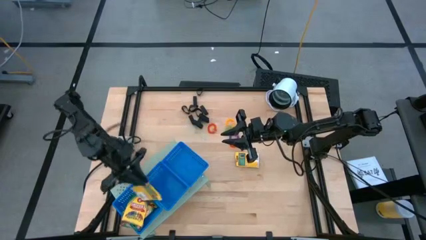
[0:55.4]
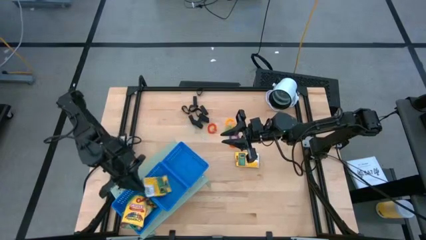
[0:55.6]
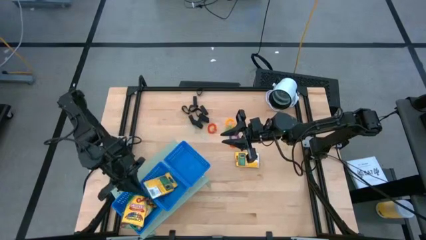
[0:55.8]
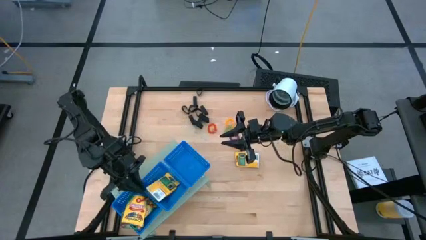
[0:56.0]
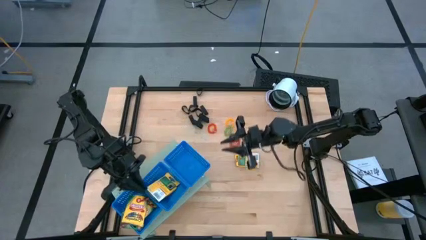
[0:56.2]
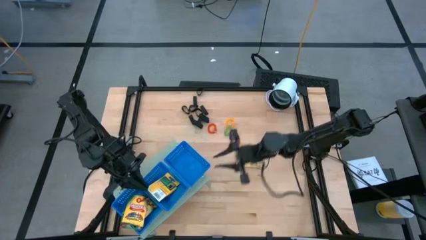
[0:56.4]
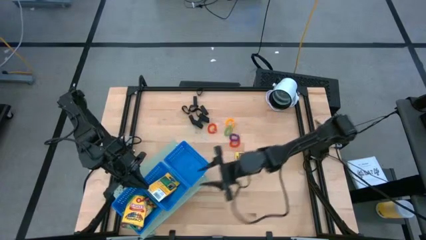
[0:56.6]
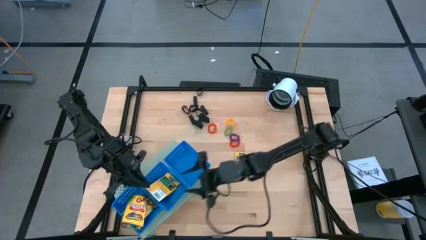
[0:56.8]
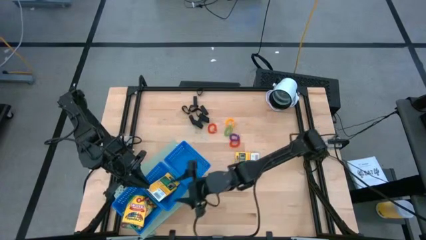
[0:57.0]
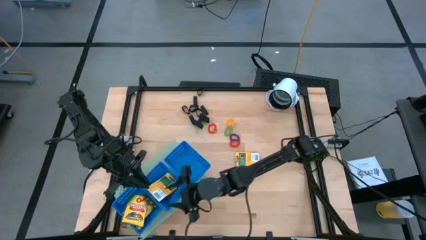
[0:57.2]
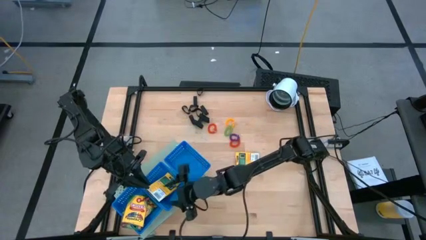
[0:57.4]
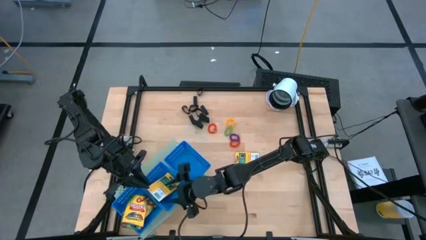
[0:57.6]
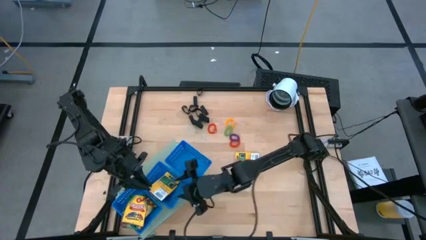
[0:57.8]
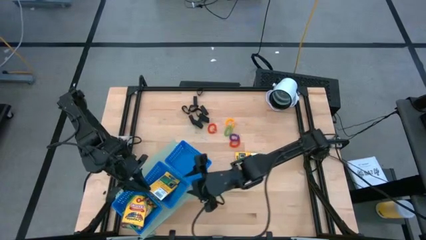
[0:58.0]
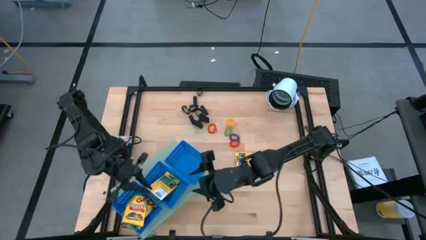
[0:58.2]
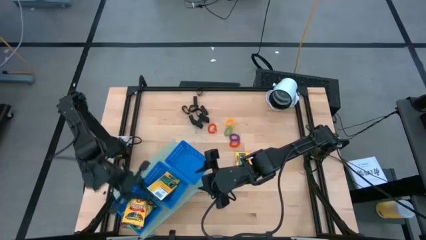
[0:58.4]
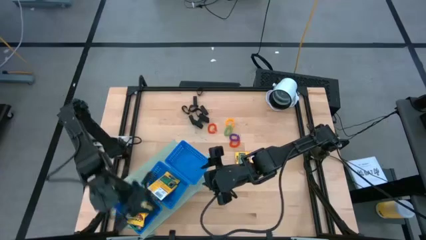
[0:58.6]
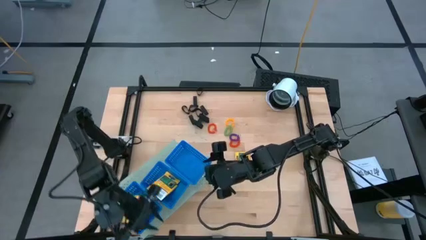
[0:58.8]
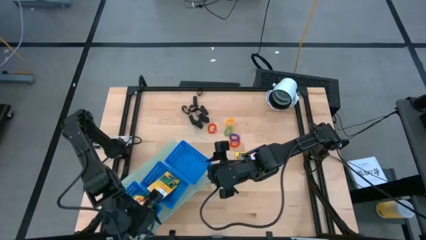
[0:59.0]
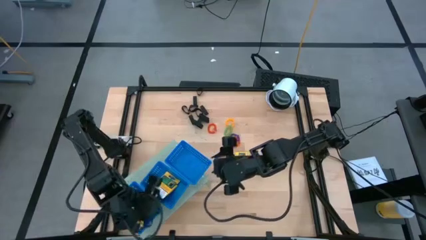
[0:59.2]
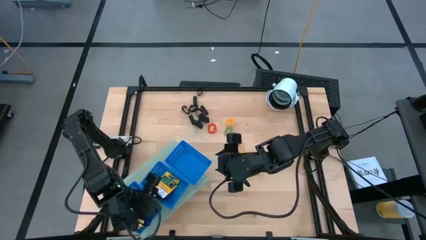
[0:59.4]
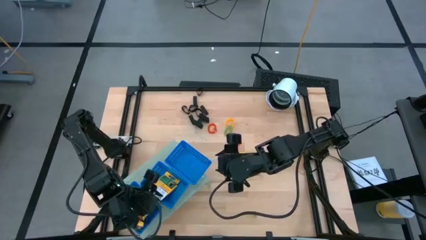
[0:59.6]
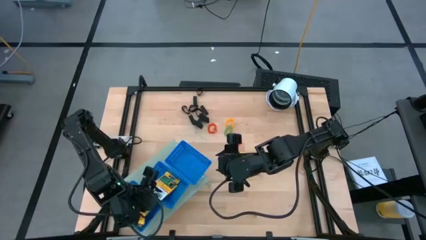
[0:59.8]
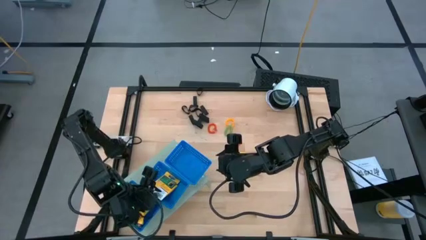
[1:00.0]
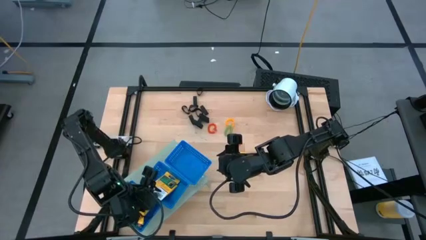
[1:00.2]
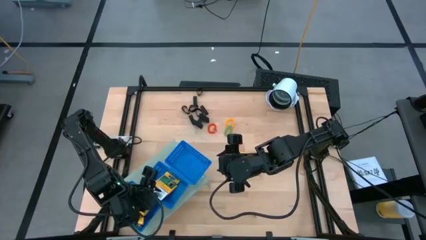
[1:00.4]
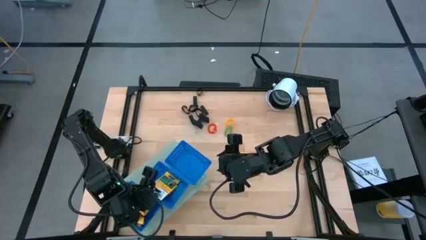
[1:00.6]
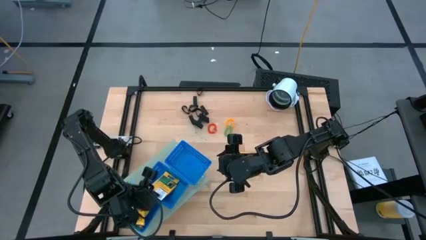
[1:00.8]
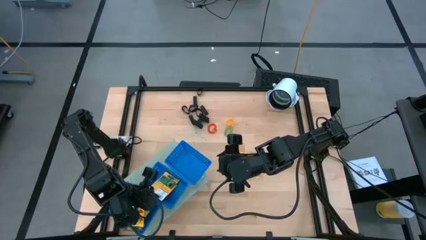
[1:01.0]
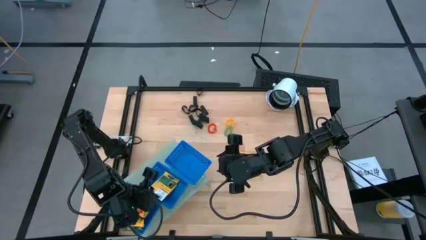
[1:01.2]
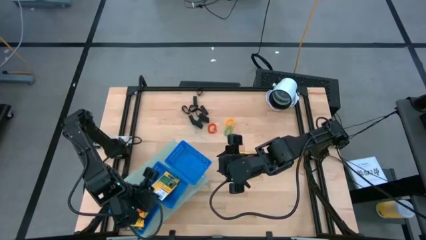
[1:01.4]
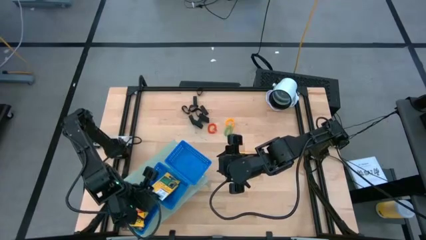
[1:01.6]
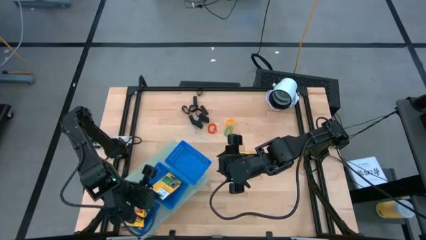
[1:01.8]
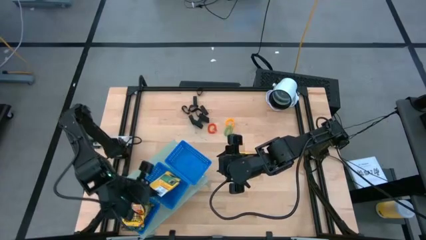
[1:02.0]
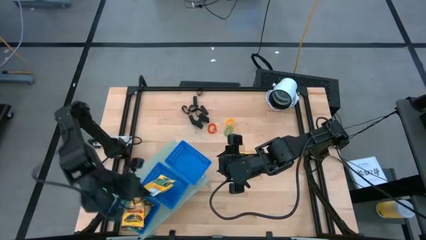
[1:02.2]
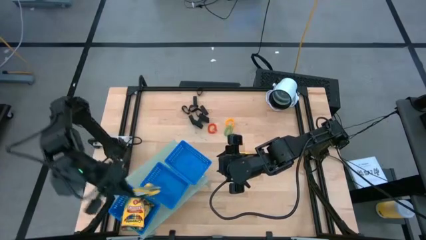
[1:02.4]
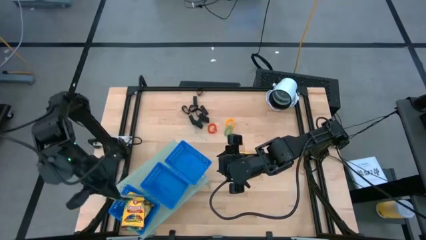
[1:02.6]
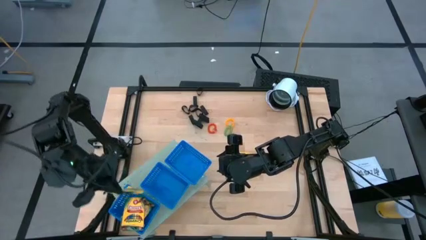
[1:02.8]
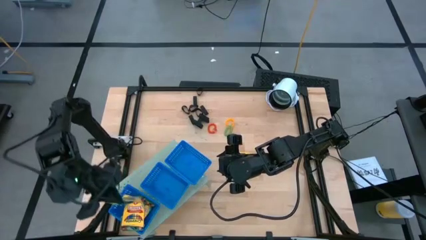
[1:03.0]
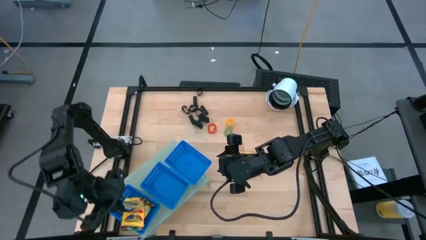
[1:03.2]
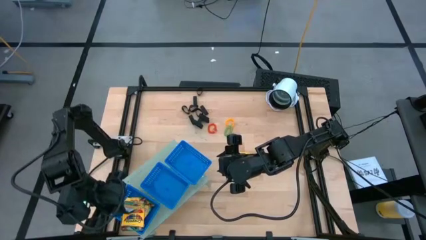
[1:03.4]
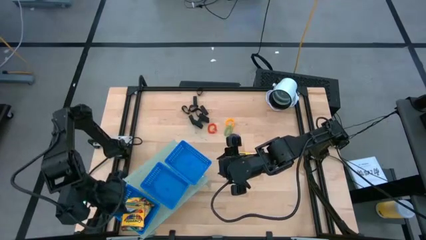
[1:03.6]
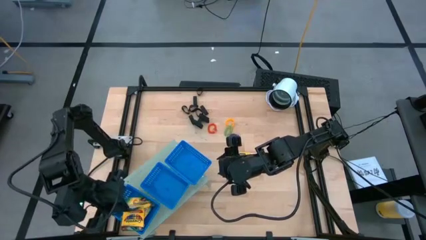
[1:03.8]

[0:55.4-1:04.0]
Task: Pick & Place Office Desk Supplies
Put the yellow crayon box into the bottom blue basket on the shelf

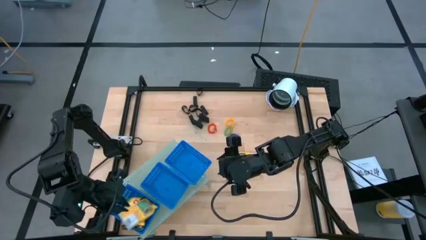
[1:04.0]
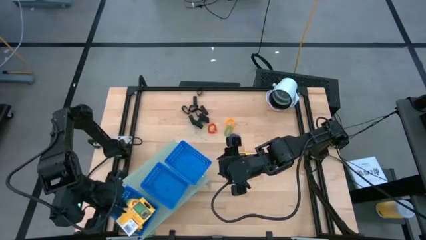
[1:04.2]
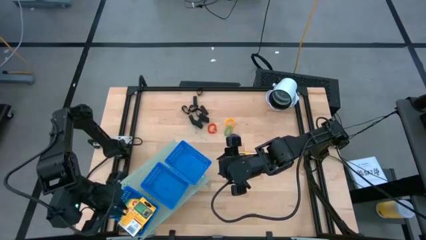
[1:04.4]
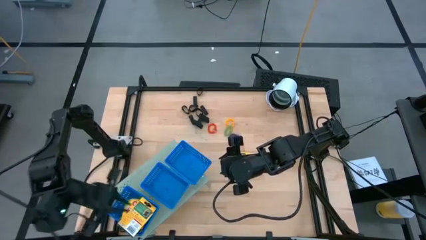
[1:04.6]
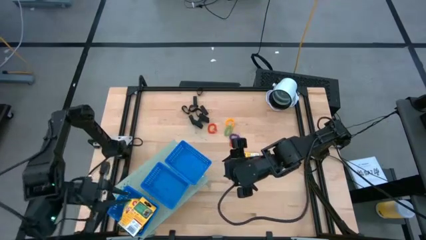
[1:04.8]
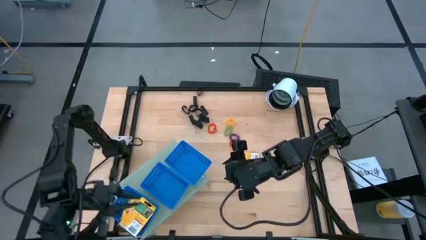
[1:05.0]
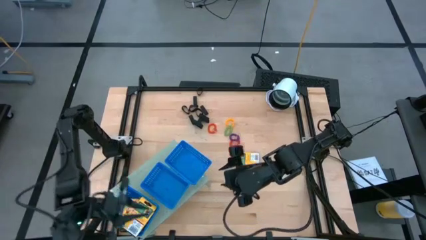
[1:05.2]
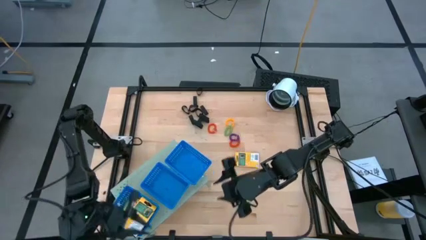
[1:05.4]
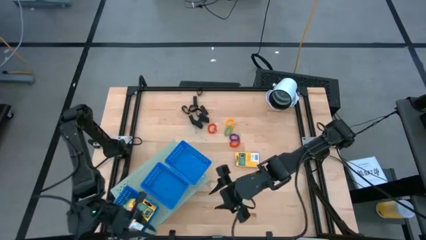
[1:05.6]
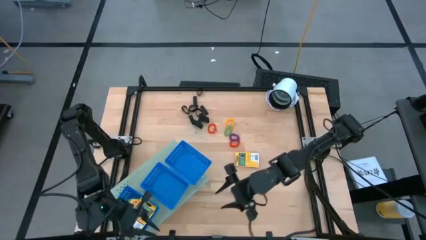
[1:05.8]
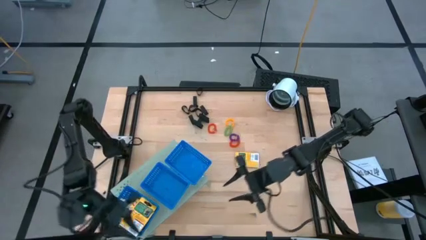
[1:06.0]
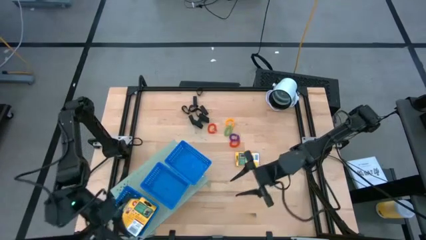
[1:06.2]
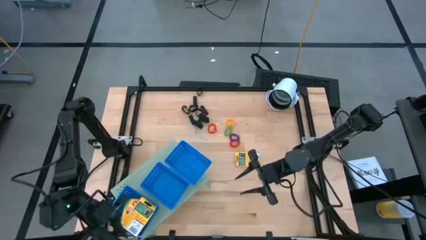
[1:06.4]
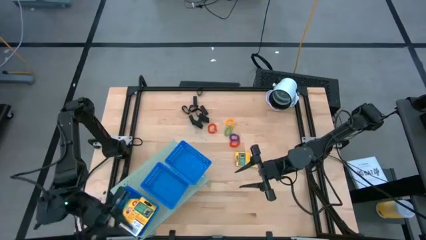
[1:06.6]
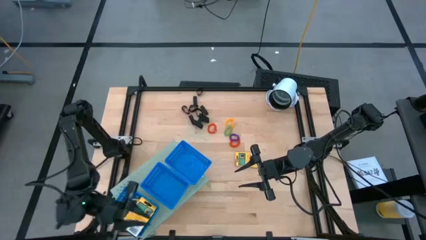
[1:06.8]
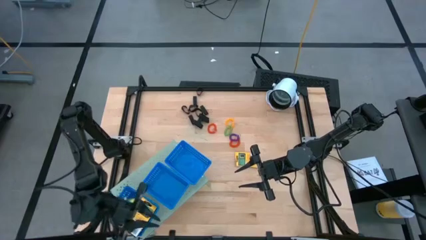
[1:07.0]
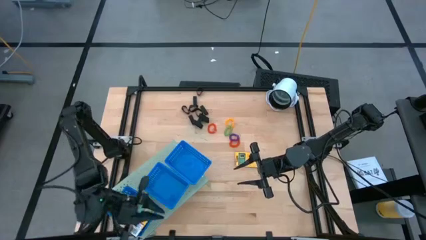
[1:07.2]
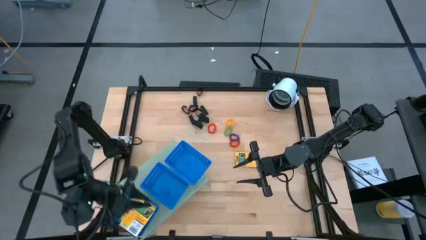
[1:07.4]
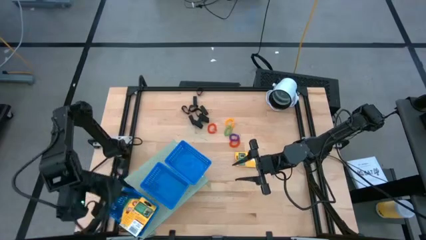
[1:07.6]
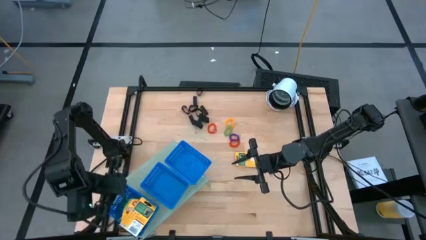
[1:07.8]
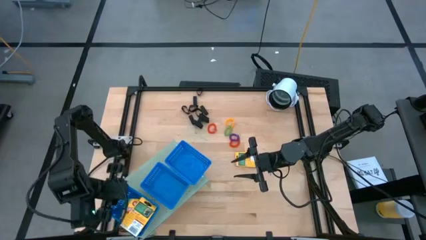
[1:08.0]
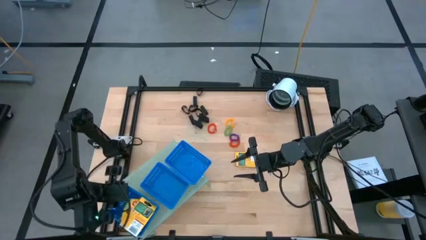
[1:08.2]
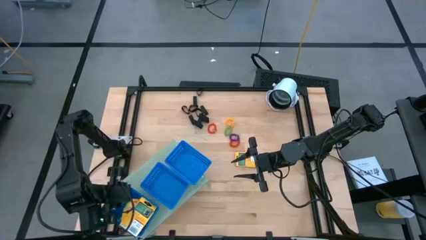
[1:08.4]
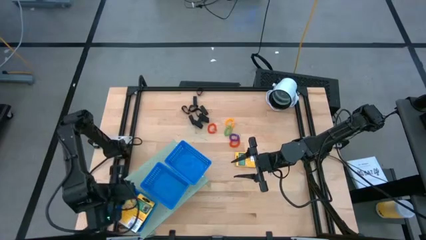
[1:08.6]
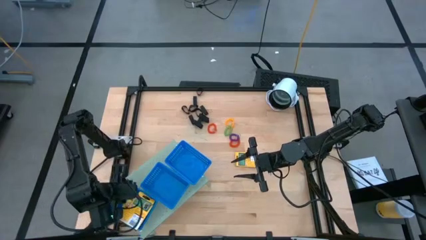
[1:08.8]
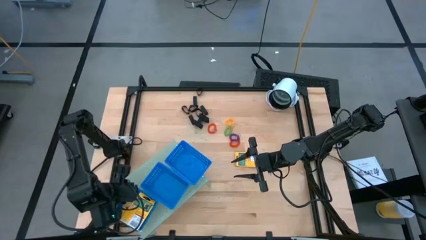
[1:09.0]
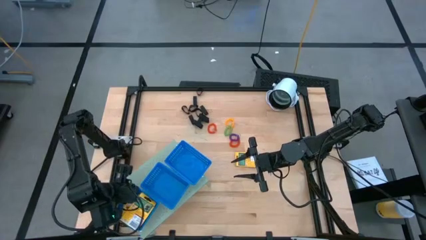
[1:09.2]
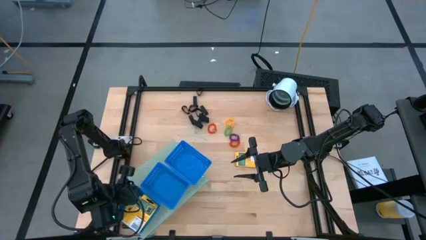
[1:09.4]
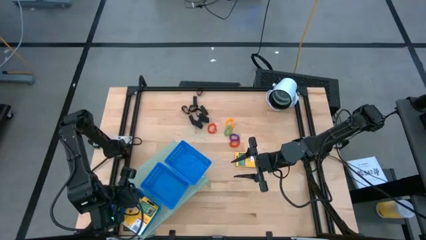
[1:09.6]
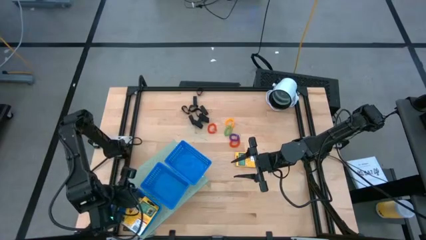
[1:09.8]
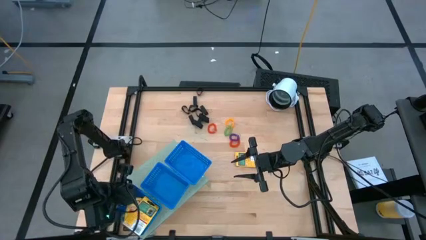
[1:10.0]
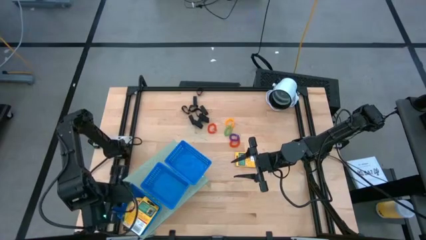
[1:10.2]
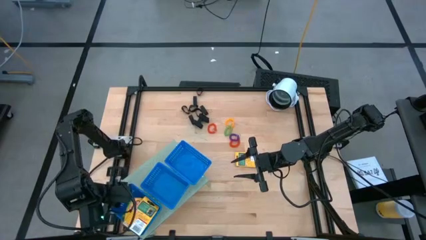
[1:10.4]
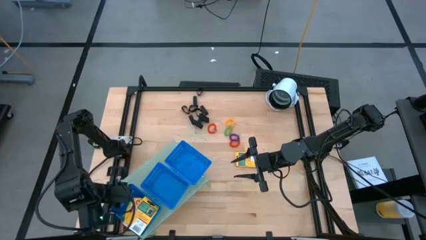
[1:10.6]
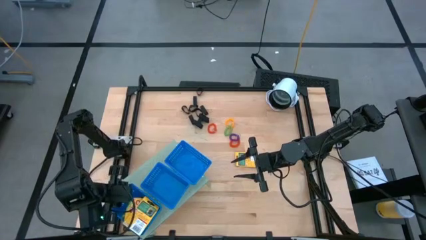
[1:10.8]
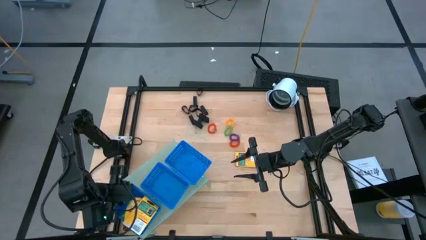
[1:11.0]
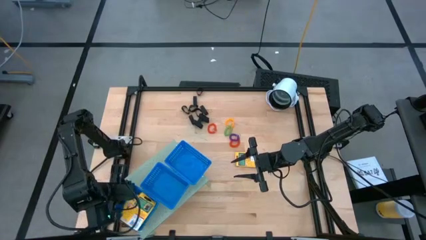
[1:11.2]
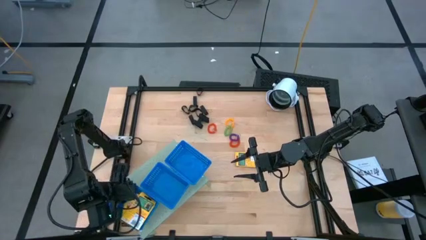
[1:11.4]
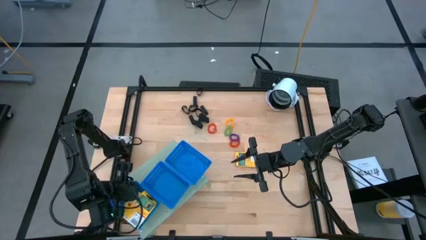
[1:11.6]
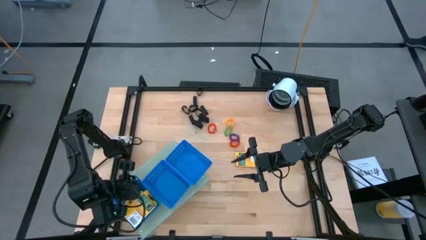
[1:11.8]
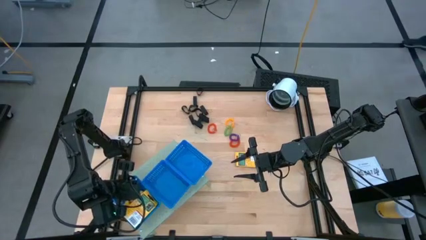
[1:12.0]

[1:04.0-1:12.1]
Adjust the bottom blue basket on the shelf
